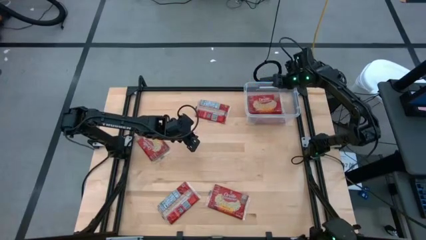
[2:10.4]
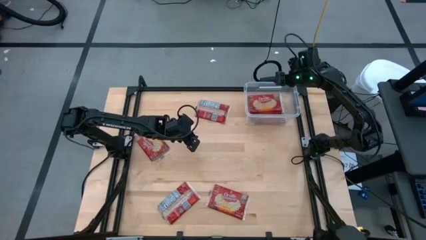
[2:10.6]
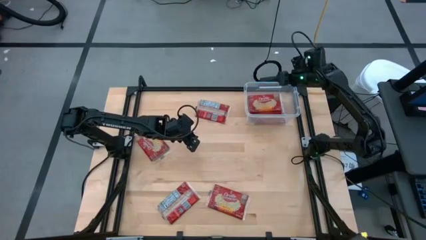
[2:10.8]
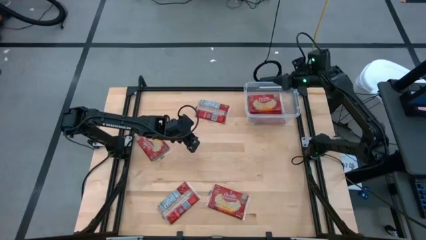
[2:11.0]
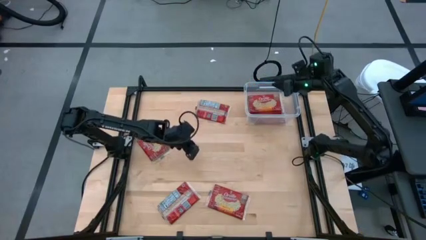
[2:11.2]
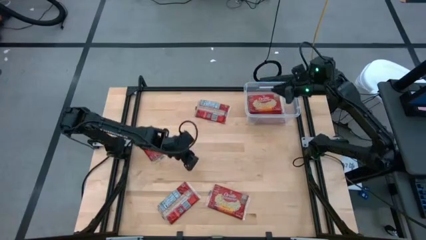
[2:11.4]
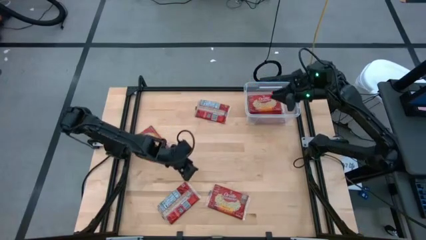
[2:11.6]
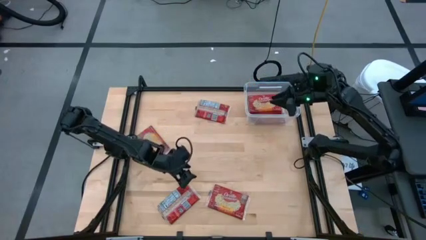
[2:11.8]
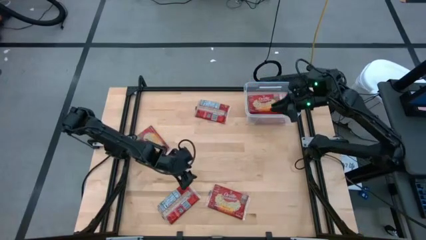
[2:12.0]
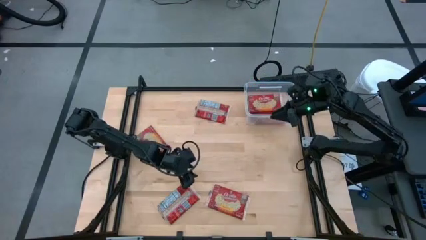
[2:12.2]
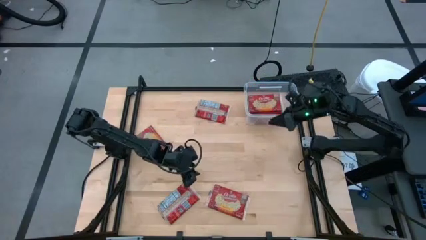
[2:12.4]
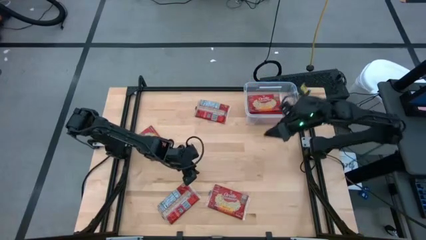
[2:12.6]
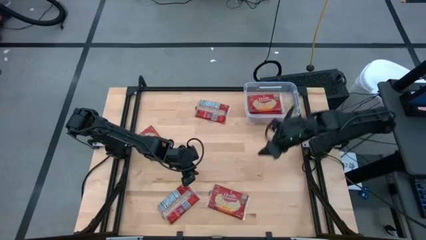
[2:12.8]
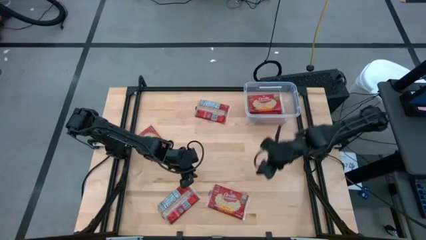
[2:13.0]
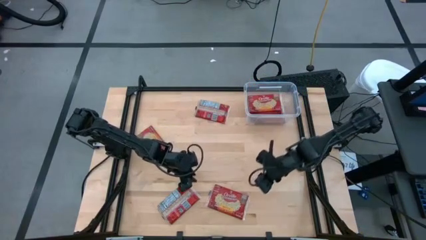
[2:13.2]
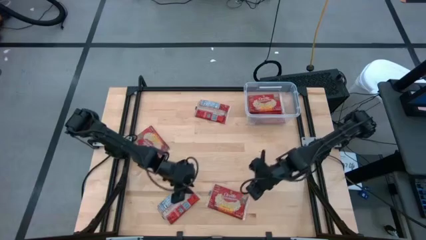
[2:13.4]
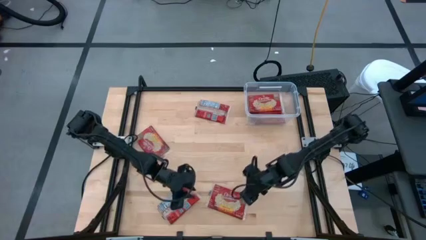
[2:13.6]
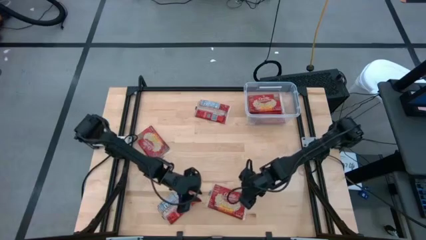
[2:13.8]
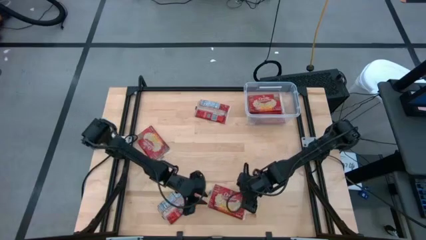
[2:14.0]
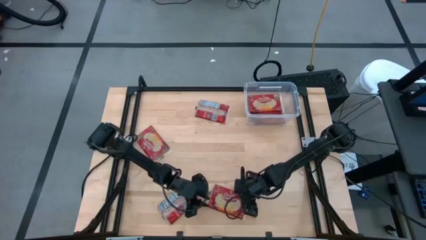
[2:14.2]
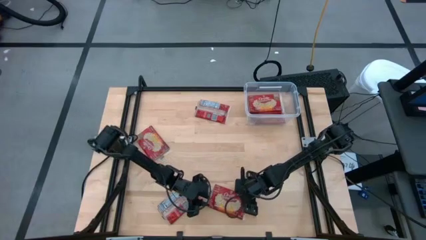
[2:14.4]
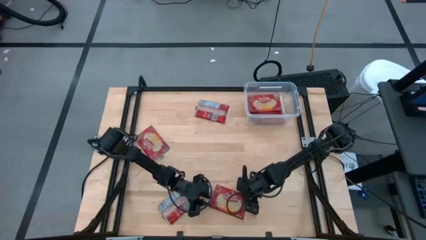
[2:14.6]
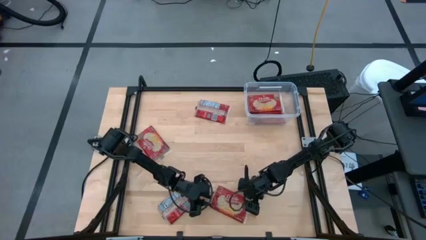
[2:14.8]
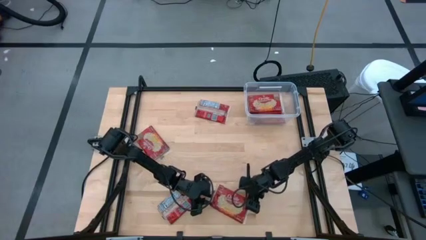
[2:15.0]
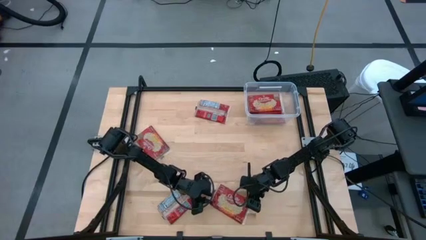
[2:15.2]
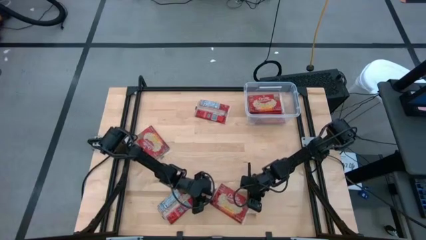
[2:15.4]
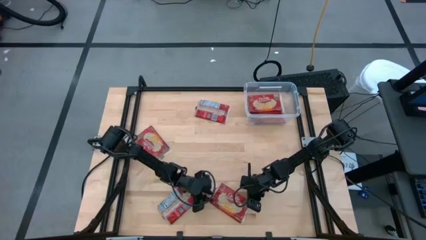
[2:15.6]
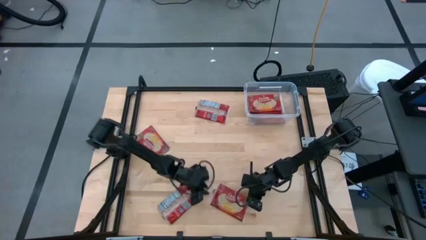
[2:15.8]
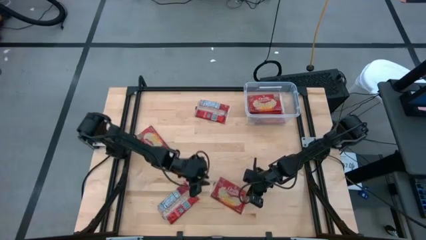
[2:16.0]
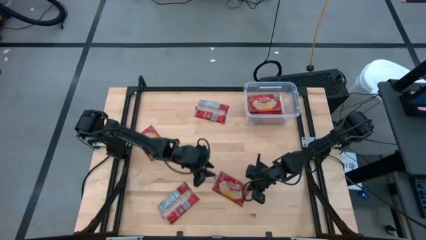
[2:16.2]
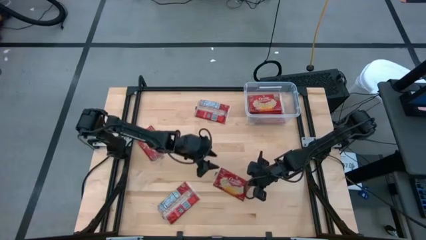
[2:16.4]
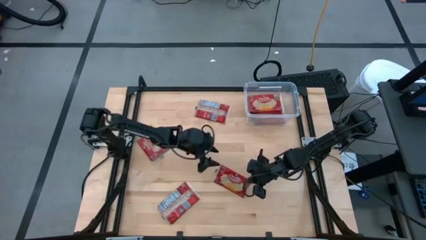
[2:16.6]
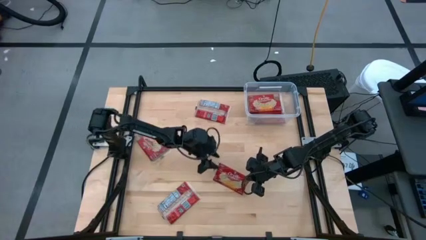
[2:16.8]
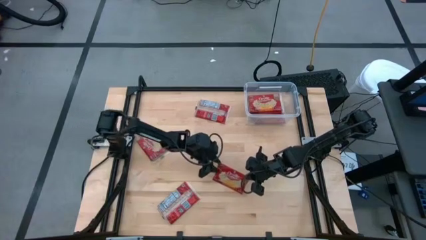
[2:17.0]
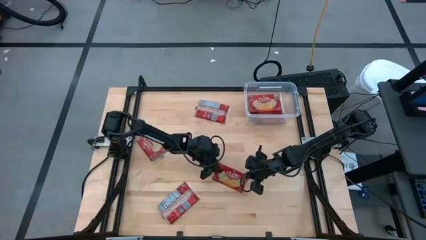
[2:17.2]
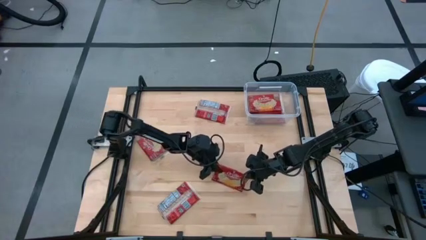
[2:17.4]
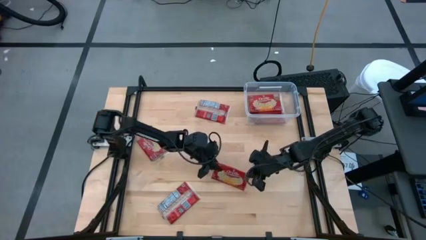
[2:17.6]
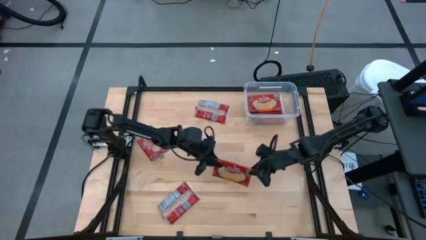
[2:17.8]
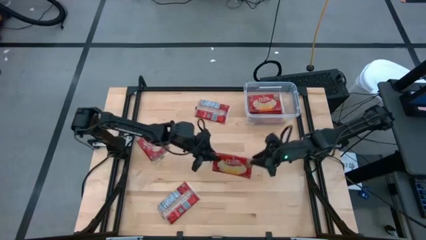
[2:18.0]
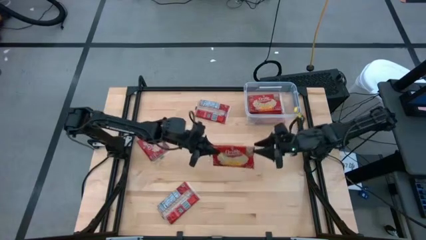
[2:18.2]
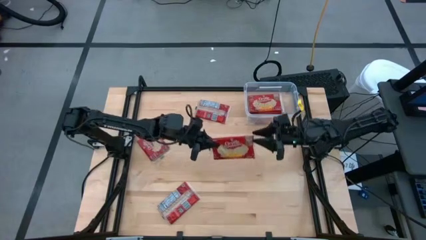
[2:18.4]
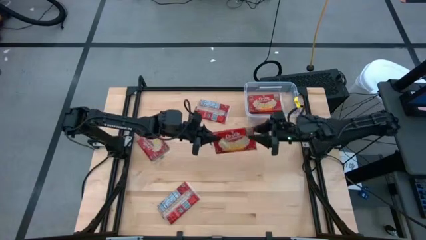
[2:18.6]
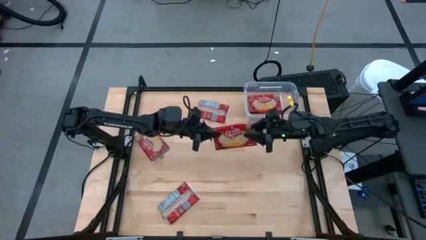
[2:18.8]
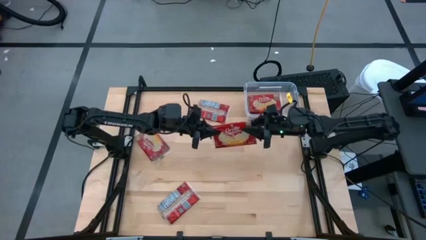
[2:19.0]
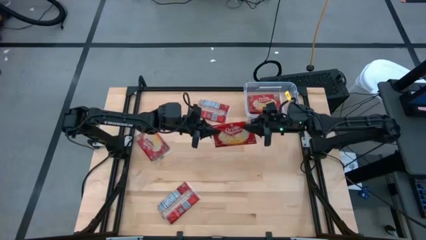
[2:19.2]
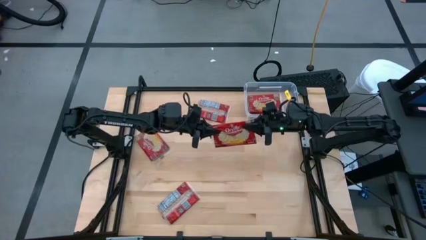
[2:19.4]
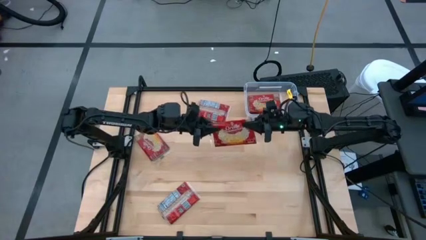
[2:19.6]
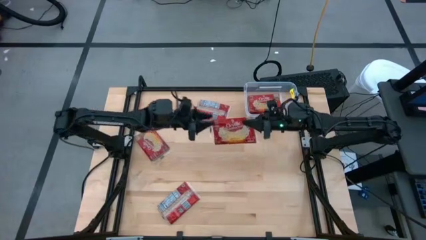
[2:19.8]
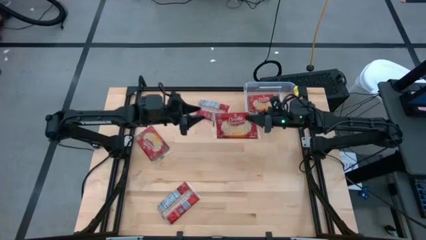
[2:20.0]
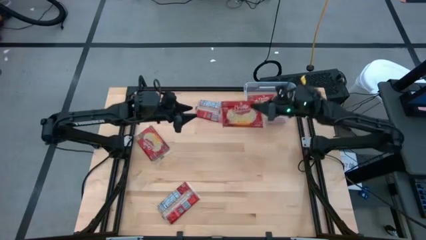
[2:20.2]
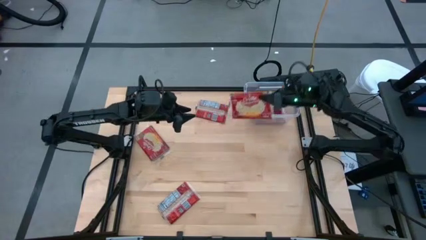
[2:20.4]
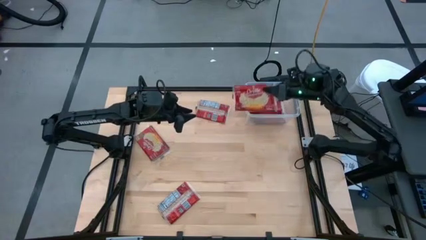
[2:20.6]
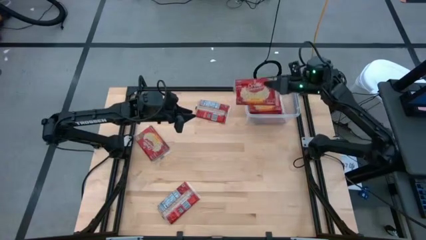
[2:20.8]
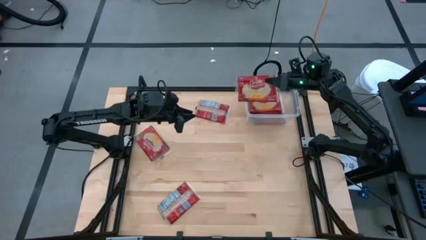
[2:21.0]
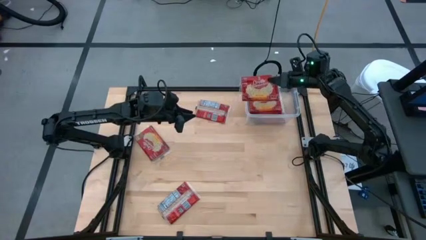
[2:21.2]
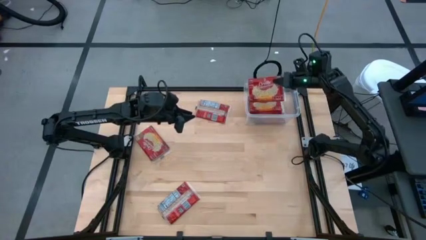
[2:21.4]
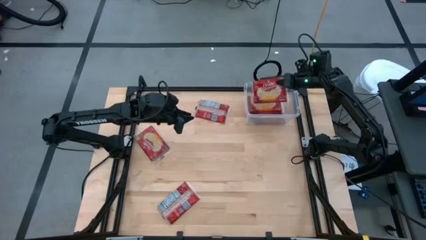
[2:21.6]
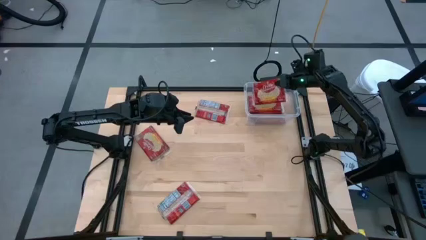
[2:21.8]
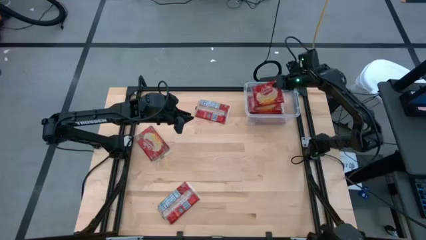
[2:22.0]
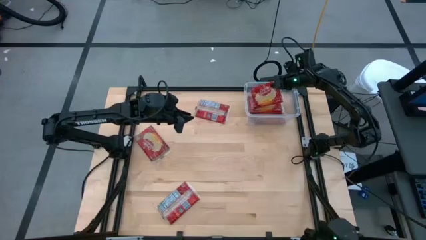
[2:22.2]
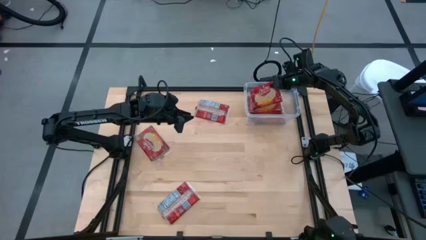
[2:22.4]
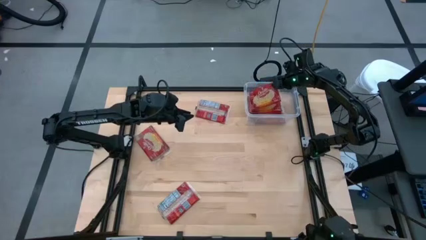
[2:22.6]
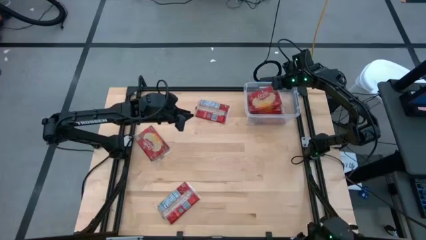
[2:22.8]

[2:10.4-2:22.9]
Task: Sort popcorn bags into baskets
Put the popcorn bag into the transparent container

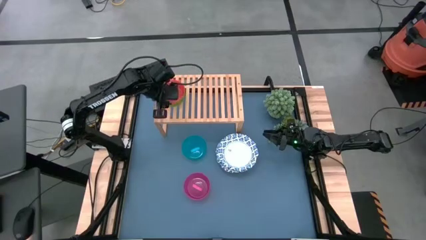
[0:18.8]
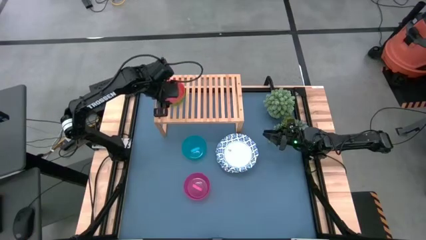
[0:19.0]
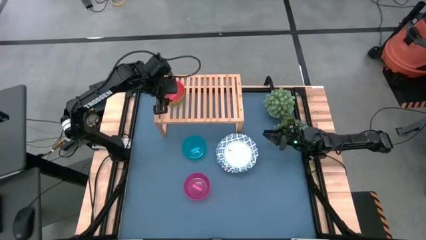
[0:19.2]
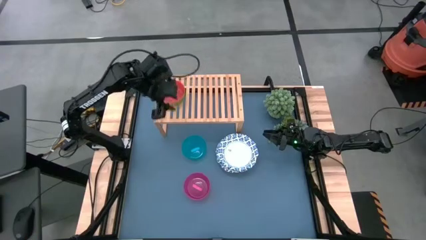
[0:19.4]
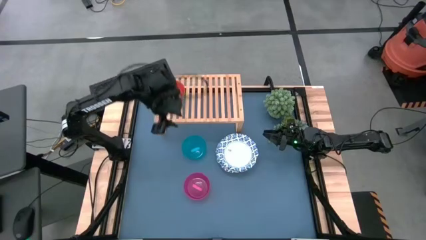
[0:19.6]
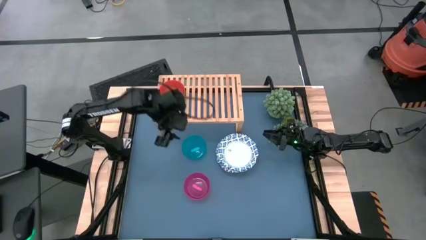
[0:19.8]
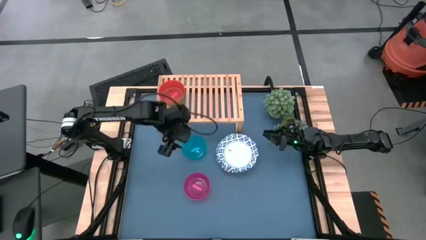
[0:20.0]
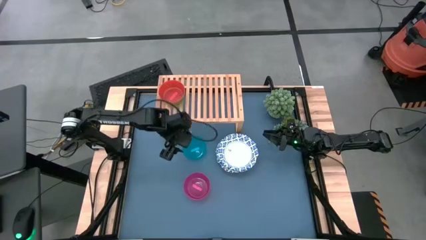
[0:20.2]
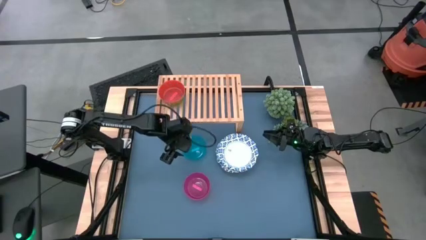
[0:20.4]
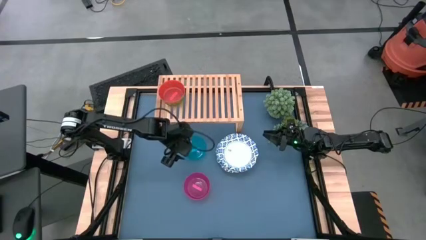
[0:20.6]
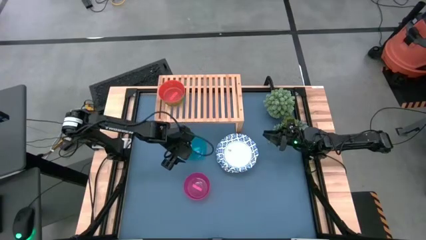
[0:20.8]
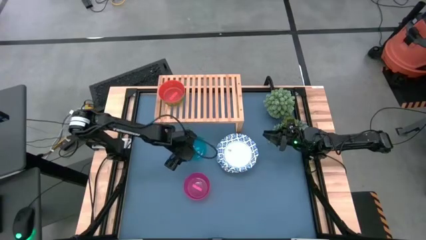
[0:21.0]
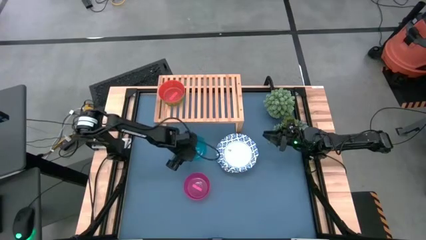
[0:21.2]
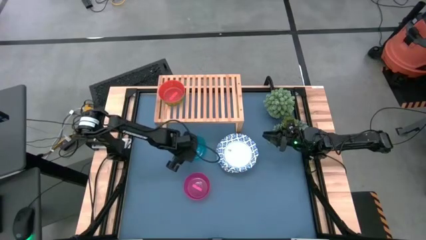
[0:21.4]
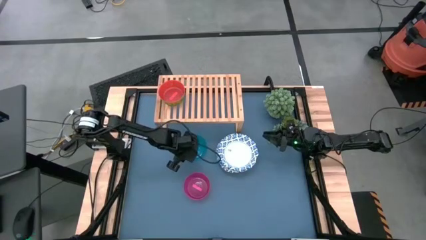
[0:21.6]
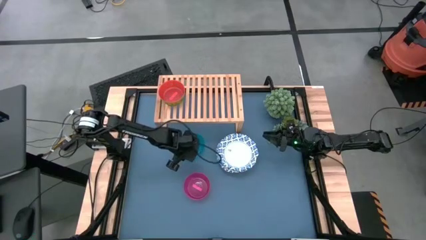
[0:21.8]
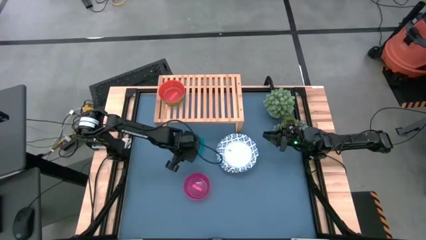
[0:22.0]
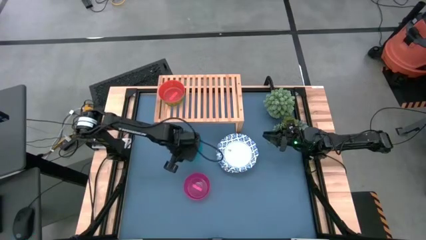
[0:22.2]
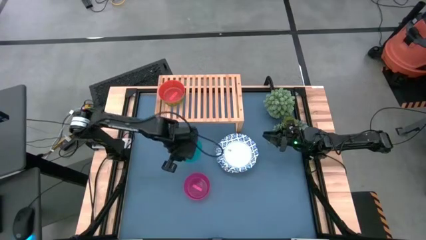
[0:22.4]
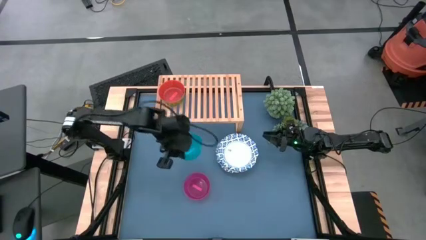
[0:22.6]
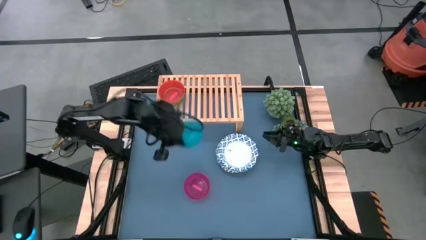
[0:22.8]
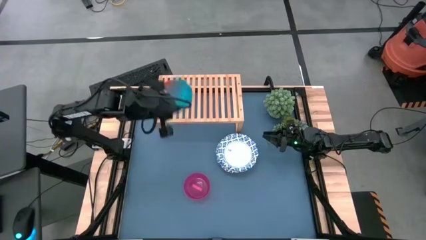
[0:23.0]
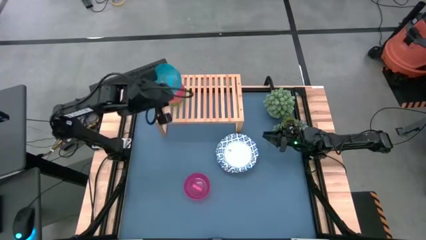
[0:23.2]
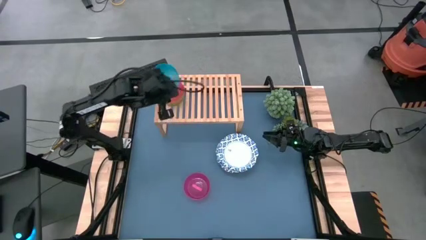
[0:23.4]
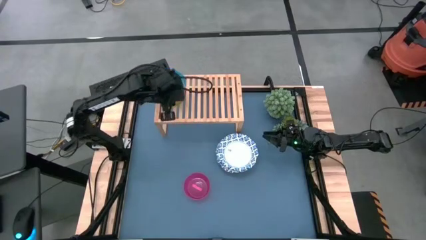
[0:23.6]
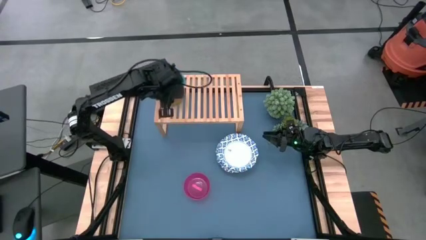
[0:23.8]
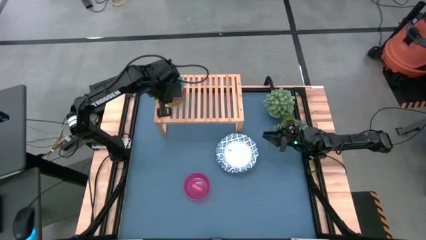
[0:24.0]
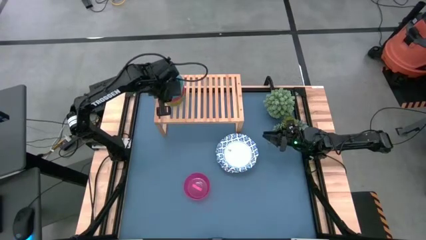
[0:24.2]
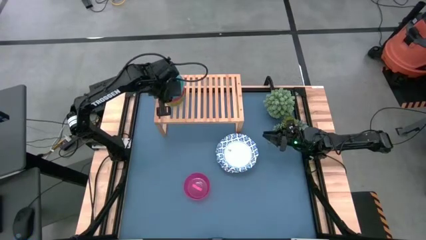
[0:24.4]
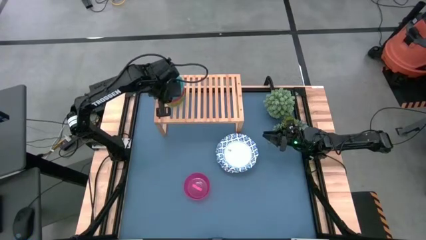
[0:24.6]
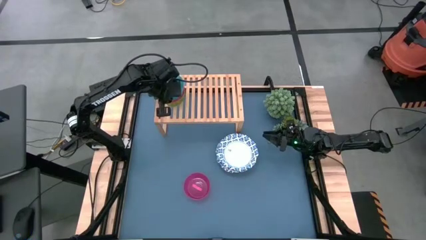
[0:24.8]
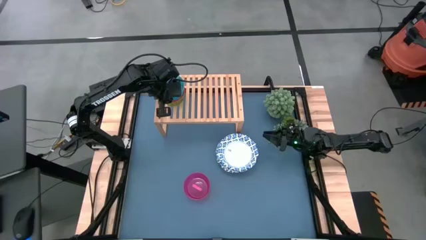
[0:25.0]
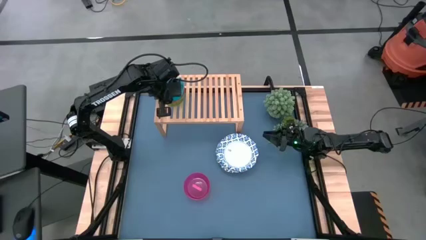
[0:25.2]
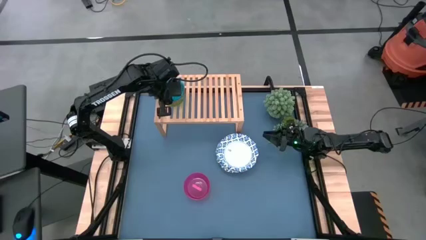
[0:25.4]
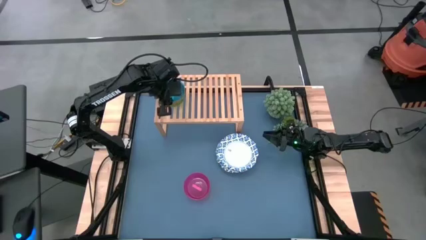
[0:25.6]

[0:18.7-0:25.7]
Task: Place and stack bowls onto a shelf
Stack the blue bowl on top of the orange bowl on the shelf
